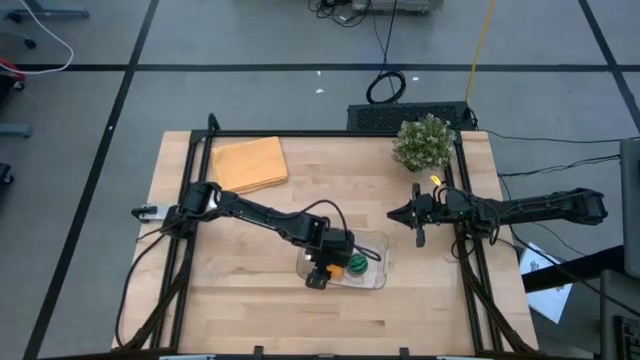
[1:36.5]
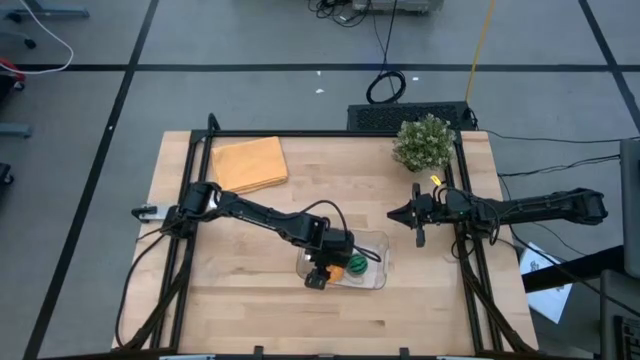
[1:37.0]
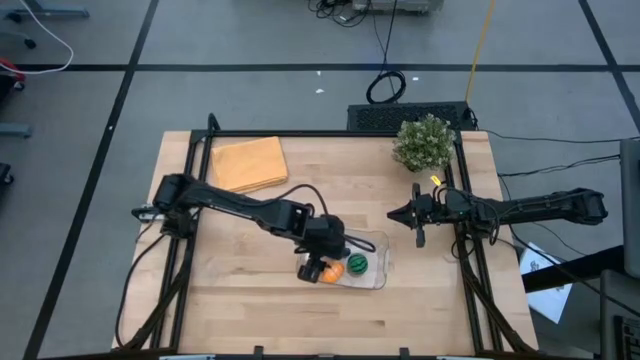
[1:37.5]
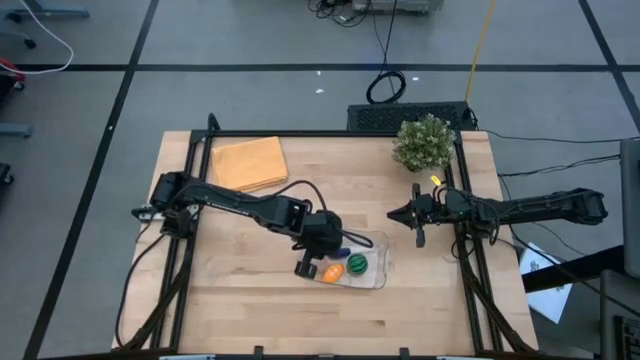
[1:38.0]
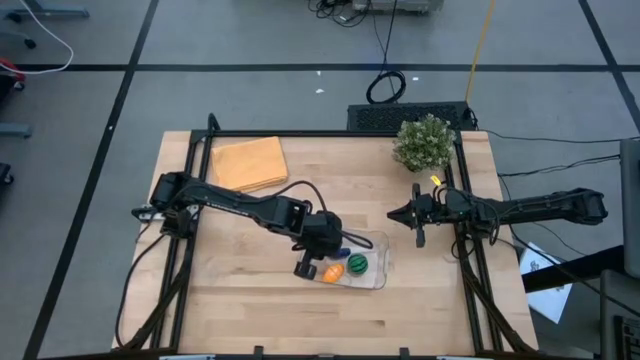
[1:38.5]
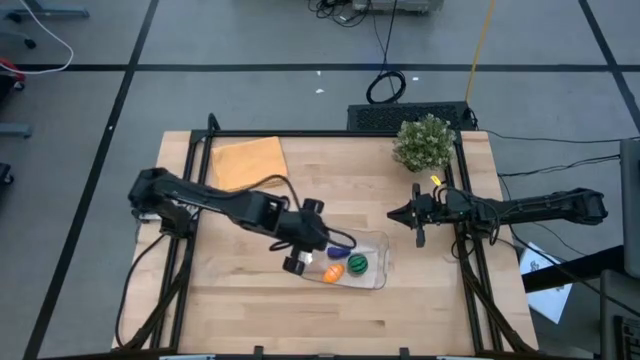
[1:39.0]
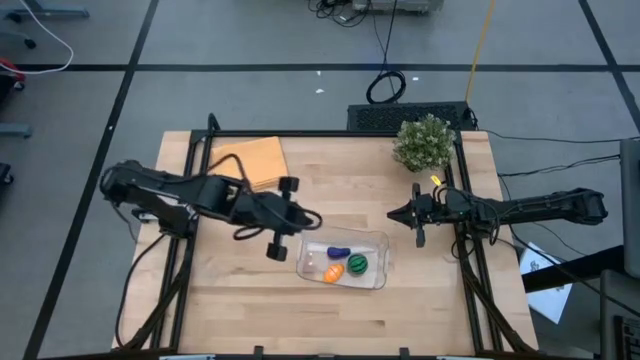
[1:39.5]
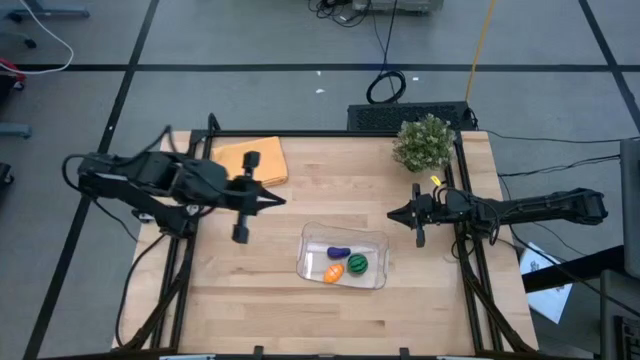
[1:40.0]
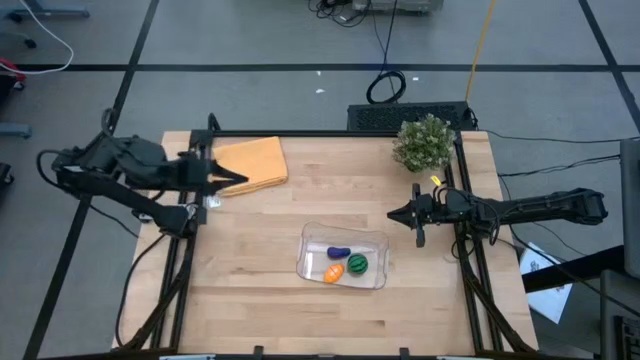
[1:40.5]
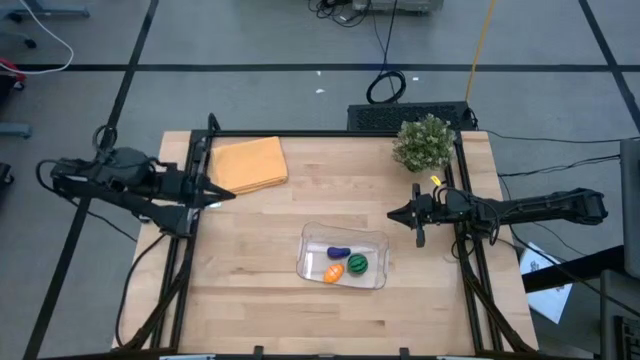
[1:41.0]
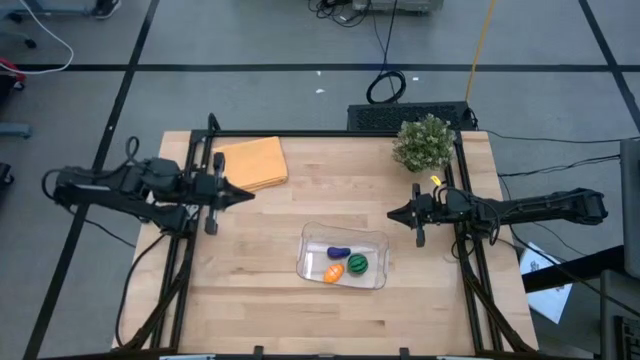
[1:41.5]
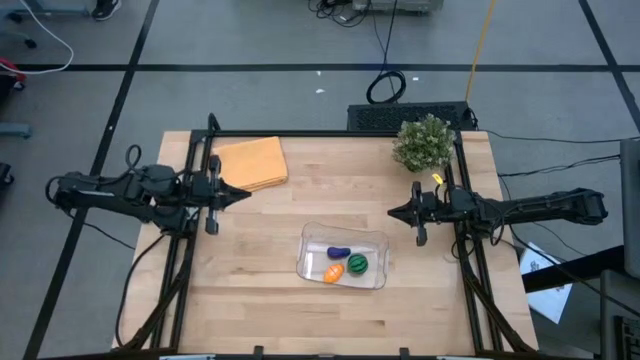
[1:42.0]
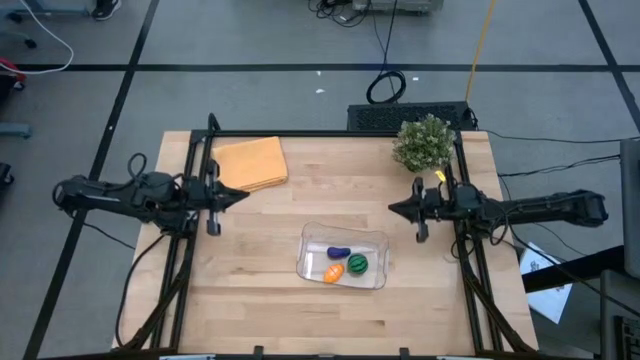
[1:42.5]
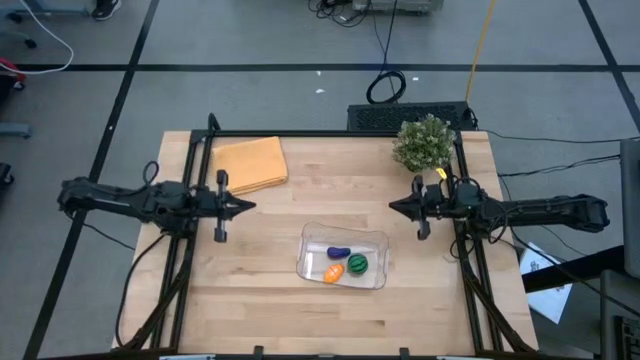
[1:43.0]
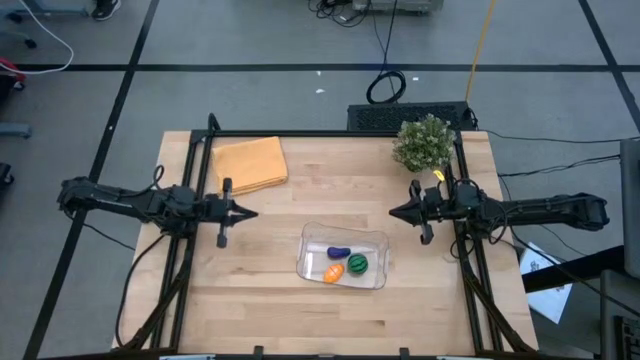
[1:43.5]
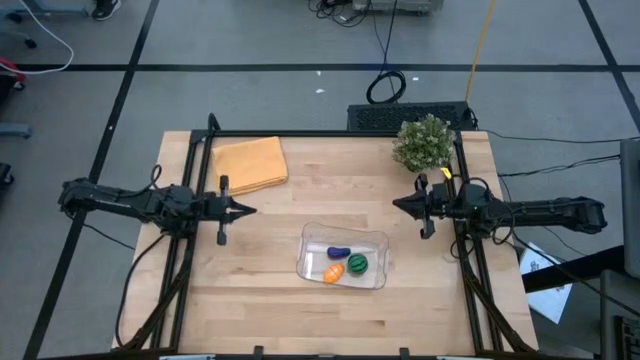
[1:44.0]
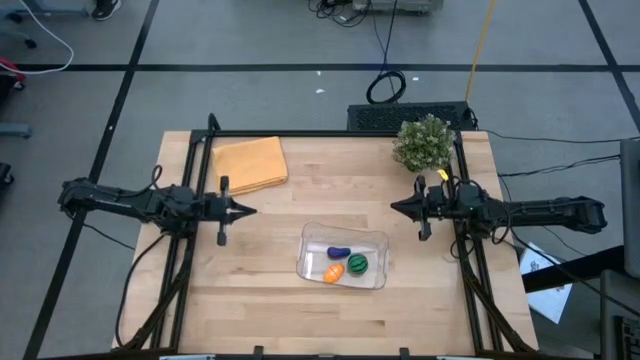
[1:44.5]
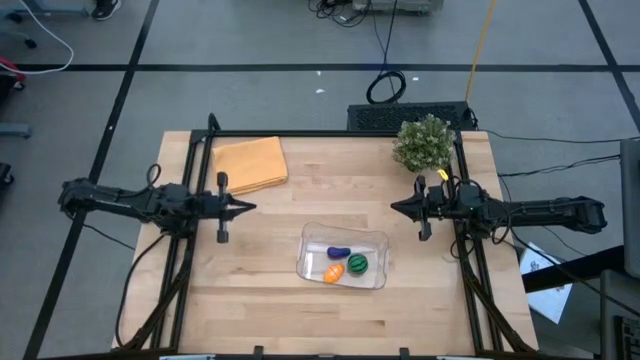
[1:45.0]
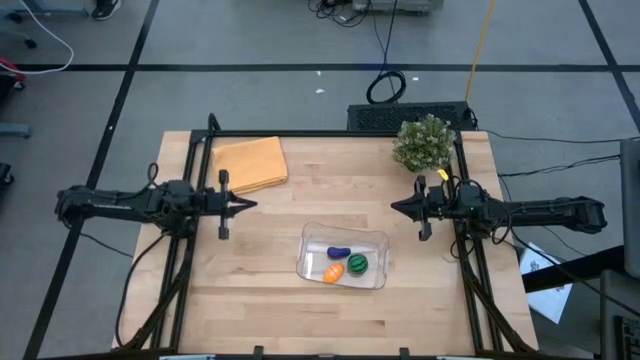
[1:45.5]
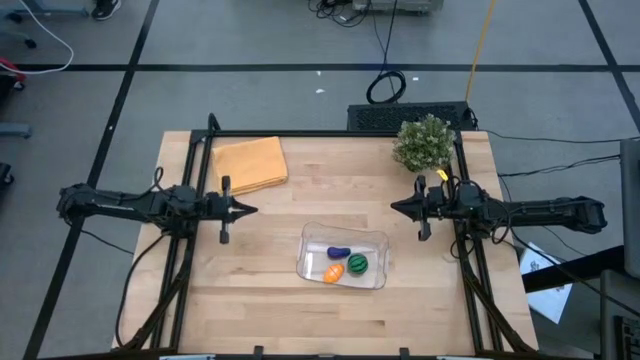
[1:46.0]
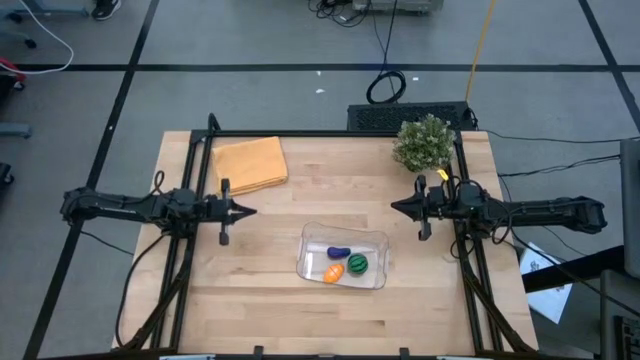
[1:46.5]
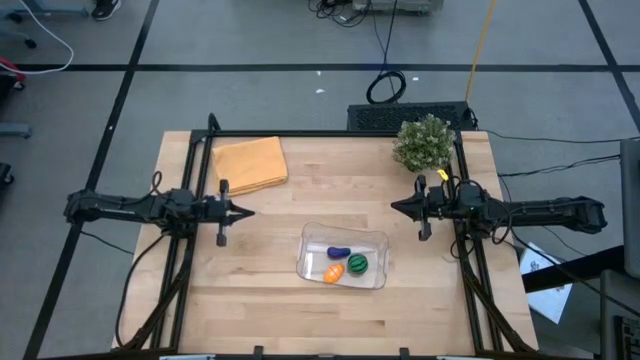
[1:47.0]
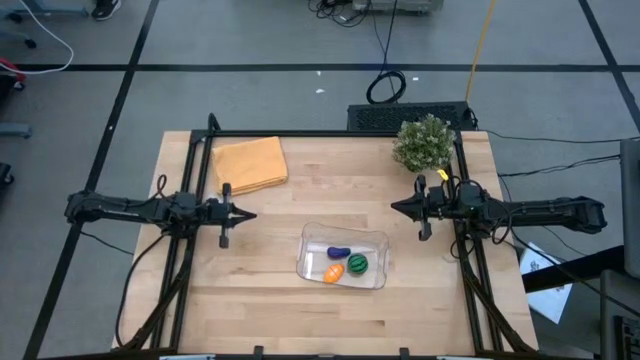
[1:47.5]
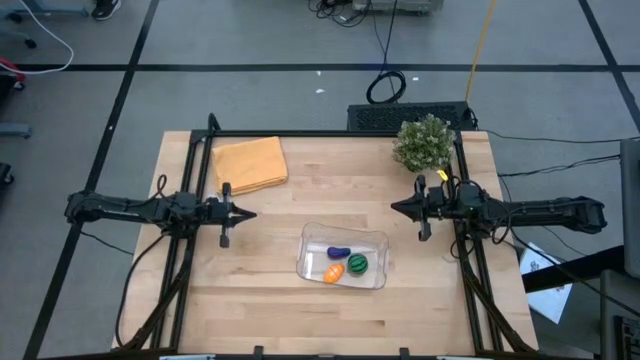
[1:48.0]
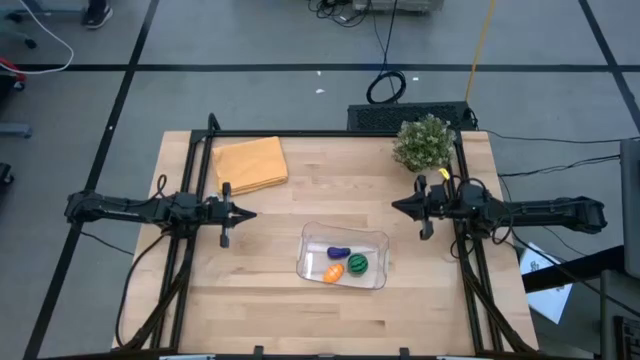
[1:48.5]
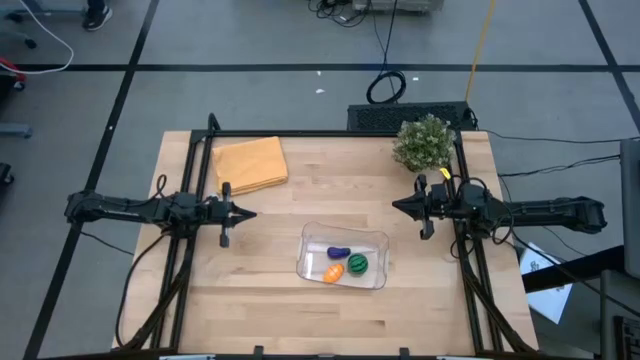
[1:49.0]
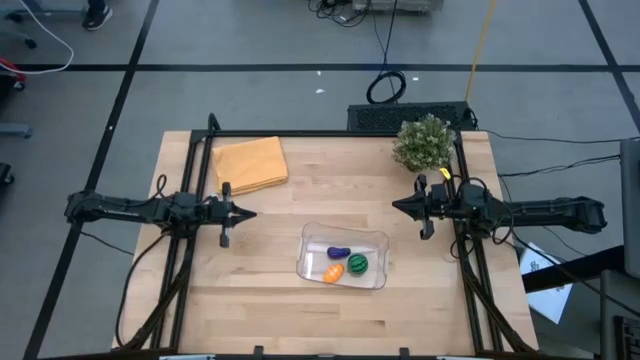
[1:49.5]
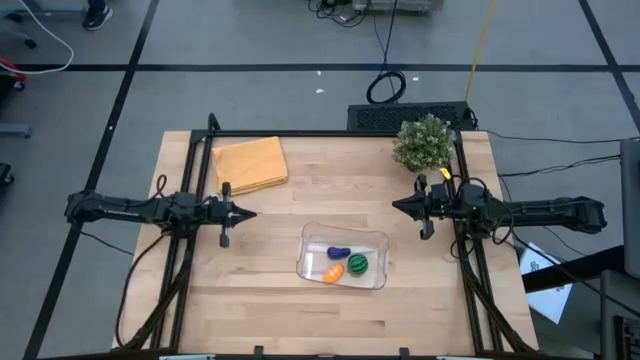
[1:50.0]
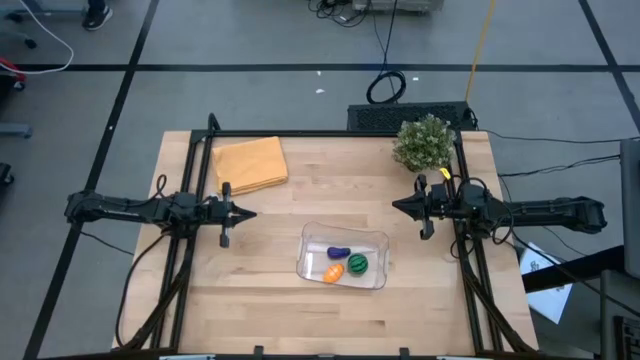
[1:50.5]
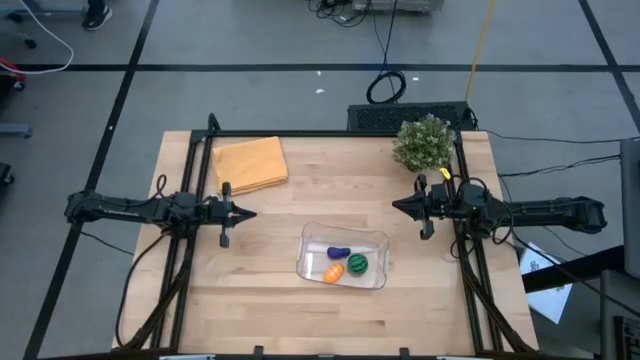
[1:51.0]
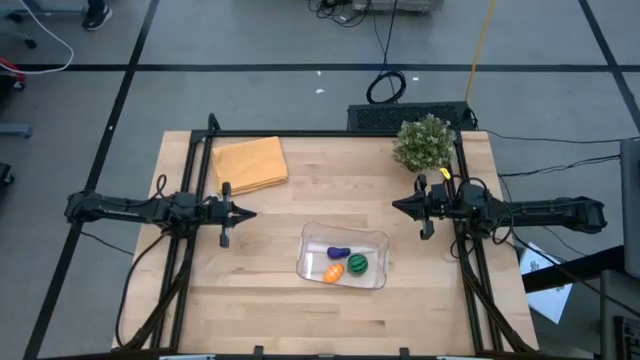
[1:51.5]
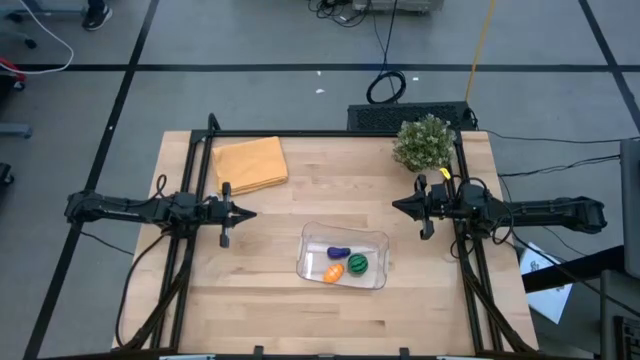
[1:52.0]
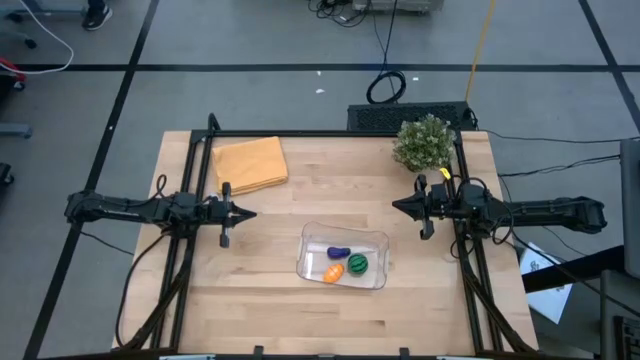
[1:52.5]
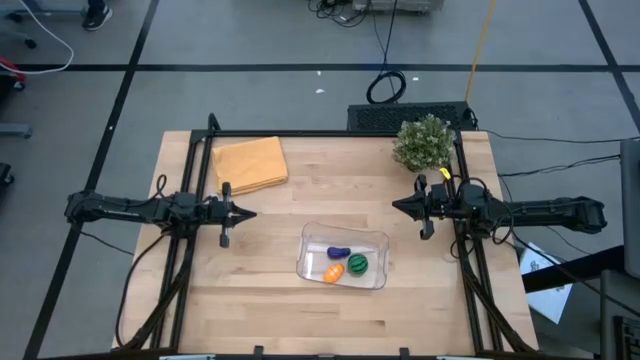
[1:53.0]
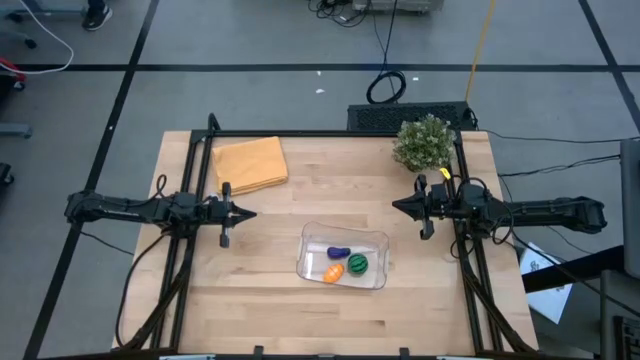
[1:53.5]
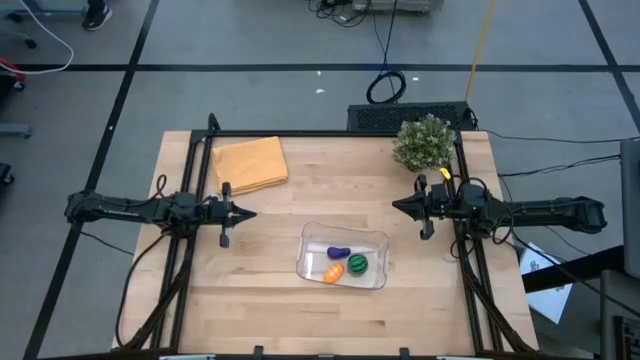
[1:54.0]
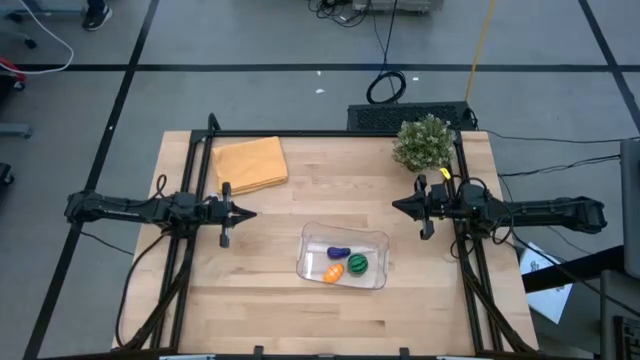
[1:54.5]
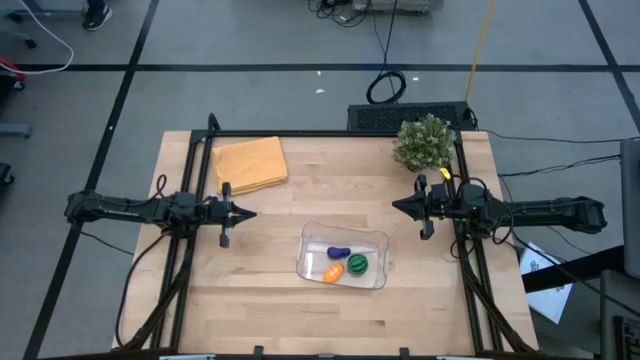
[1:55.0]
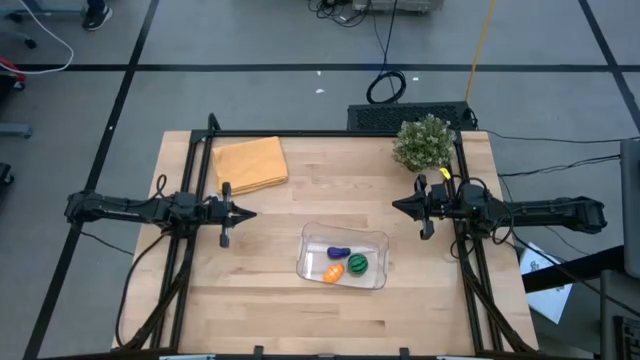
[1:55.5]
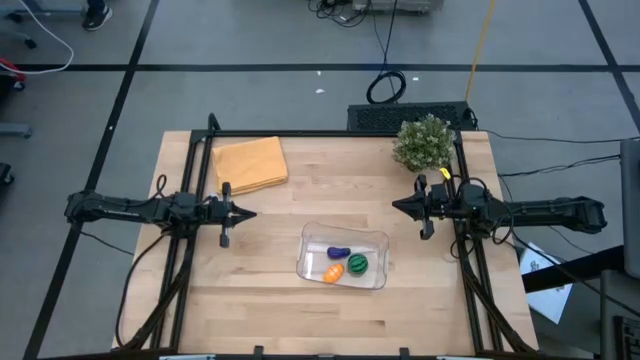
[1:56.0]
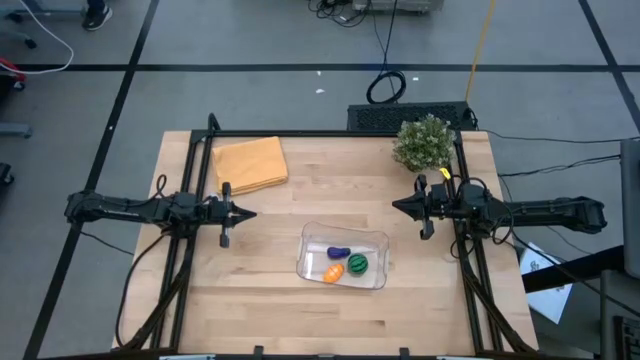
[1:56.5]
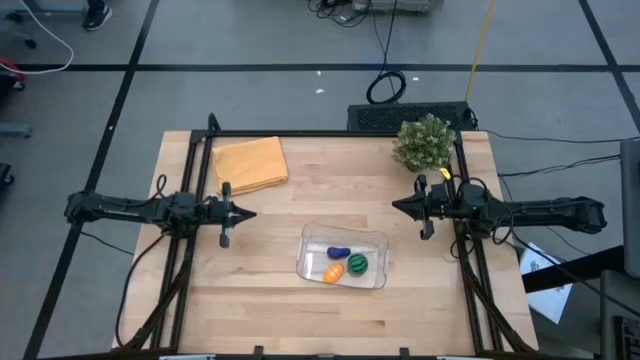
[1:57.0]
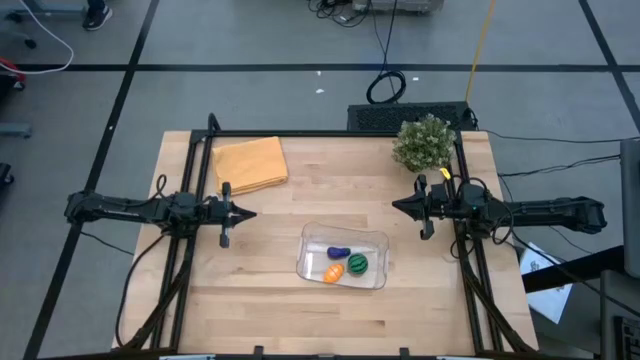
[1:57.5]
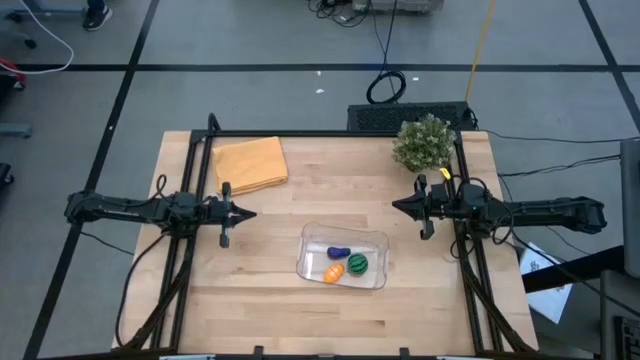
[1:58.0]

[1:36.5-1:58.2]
Task: Pick and placing Produce into tupperware
Return to Home Position
